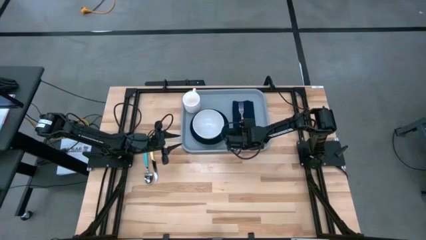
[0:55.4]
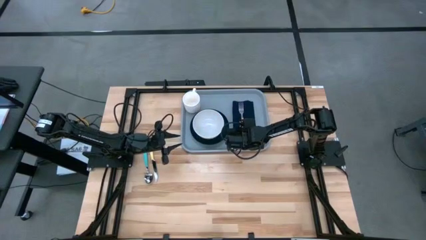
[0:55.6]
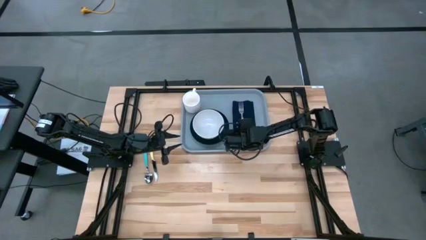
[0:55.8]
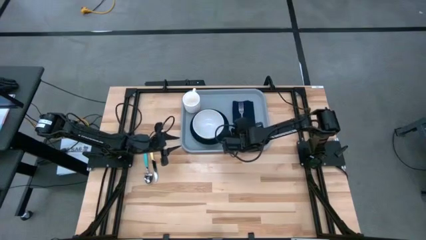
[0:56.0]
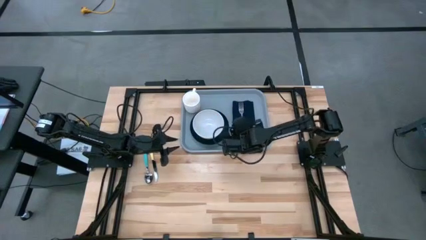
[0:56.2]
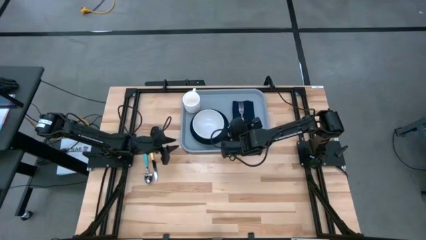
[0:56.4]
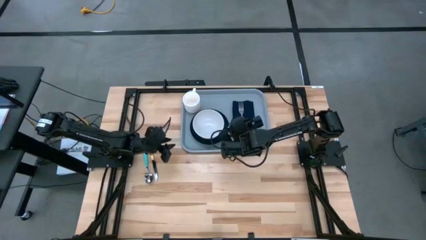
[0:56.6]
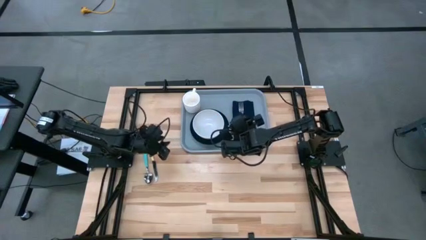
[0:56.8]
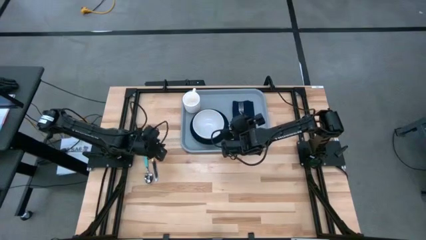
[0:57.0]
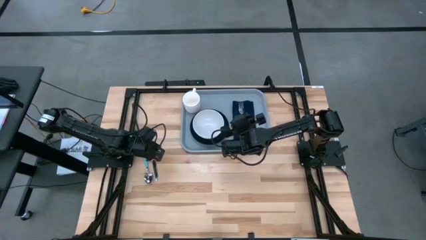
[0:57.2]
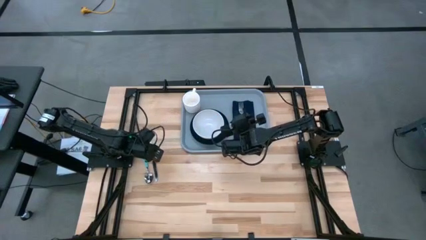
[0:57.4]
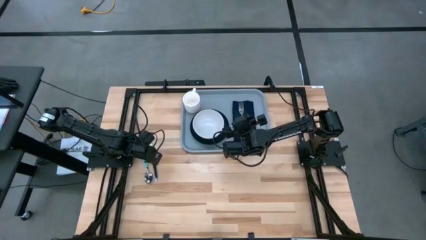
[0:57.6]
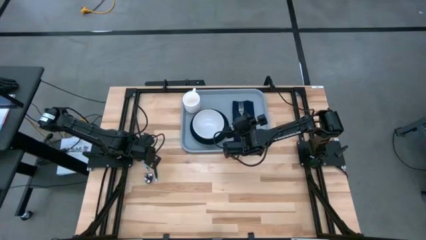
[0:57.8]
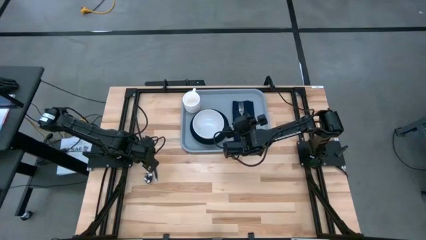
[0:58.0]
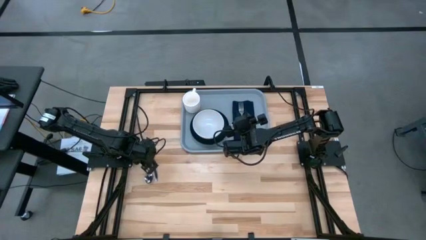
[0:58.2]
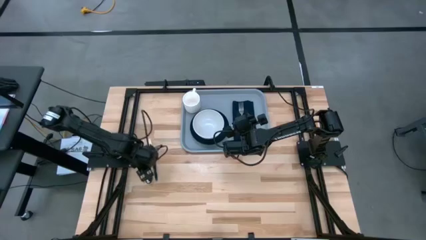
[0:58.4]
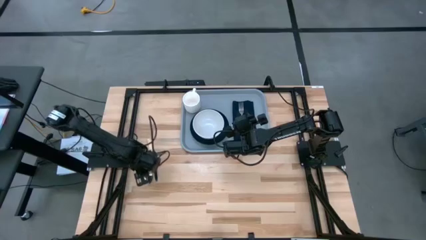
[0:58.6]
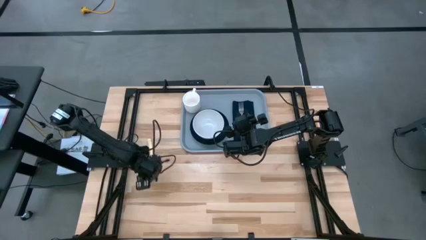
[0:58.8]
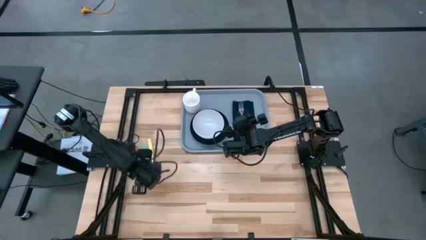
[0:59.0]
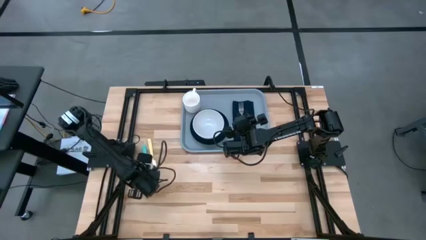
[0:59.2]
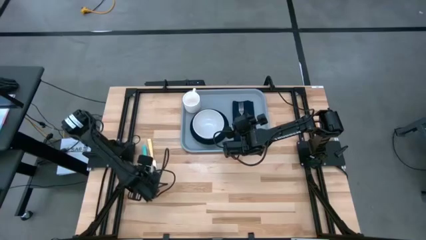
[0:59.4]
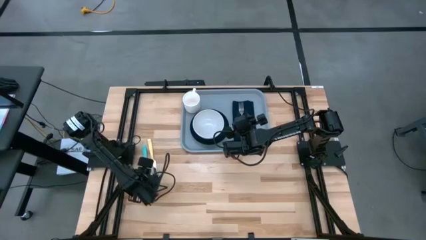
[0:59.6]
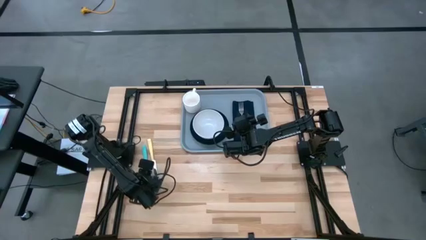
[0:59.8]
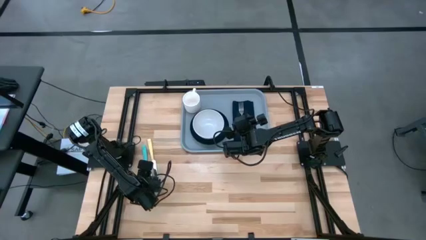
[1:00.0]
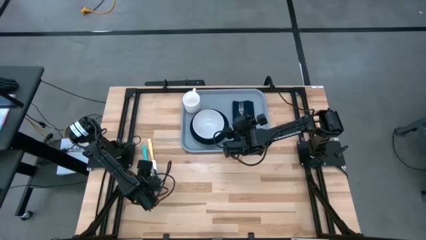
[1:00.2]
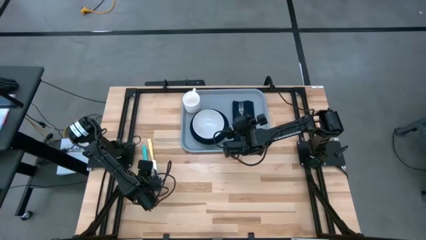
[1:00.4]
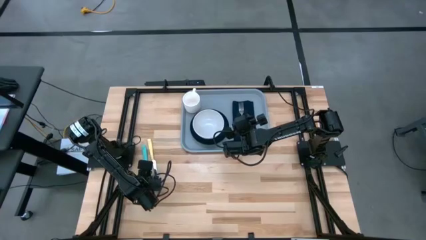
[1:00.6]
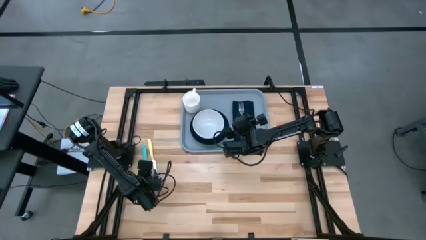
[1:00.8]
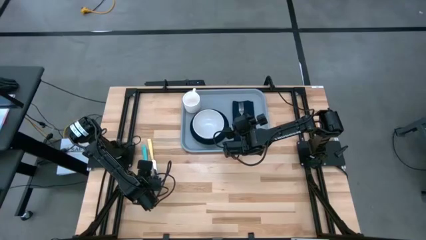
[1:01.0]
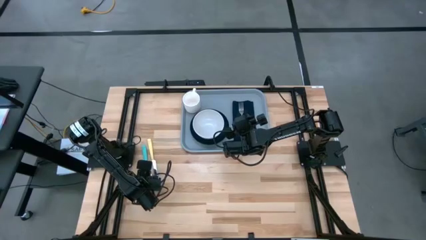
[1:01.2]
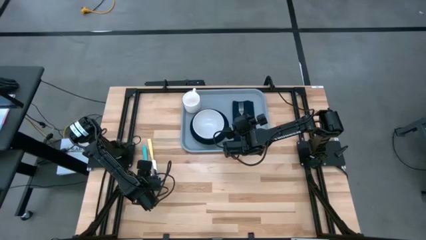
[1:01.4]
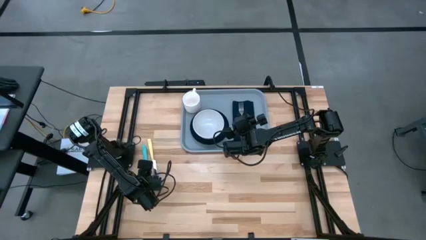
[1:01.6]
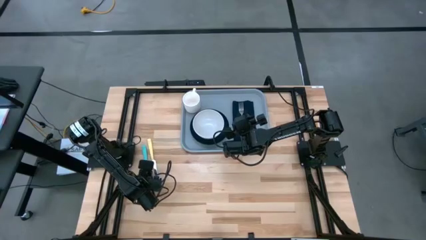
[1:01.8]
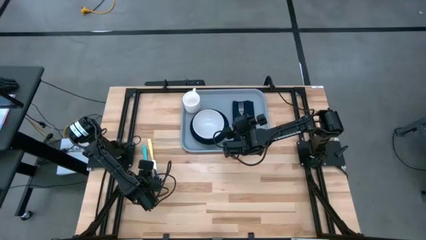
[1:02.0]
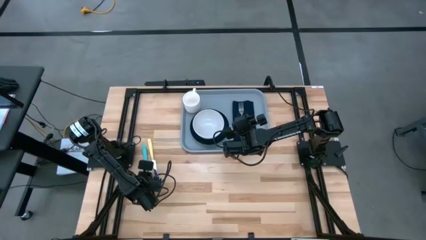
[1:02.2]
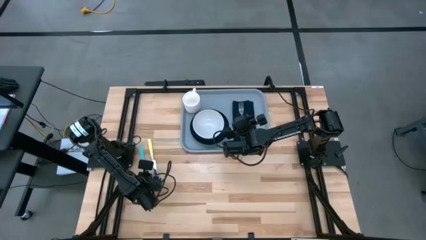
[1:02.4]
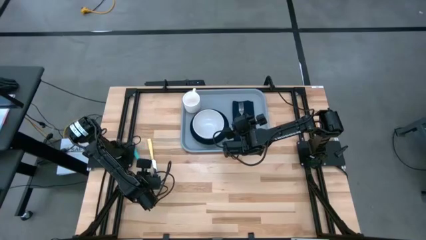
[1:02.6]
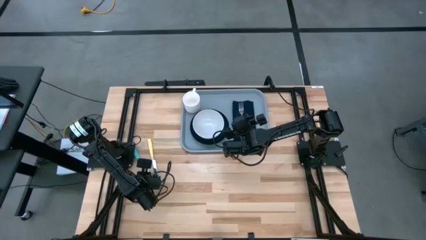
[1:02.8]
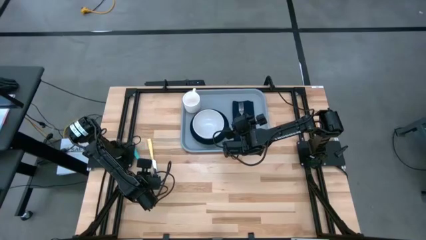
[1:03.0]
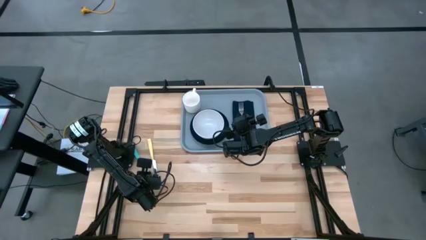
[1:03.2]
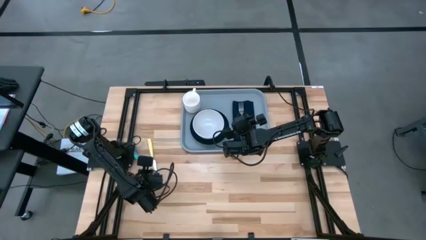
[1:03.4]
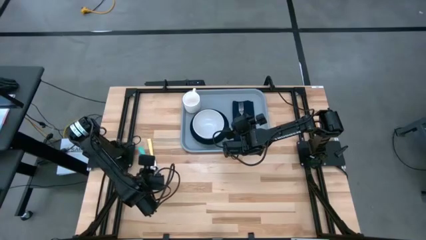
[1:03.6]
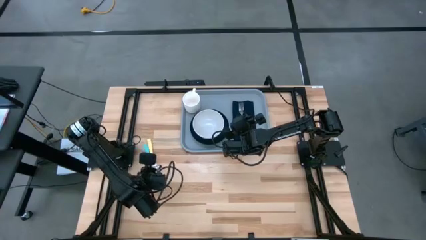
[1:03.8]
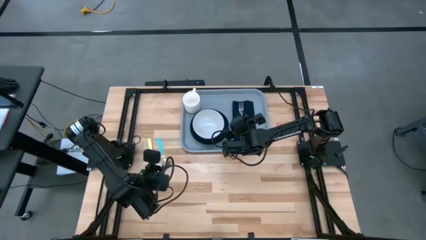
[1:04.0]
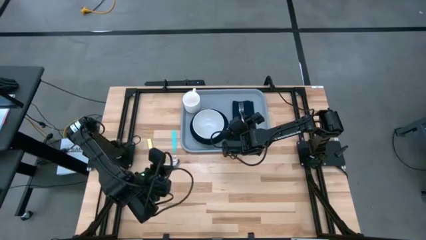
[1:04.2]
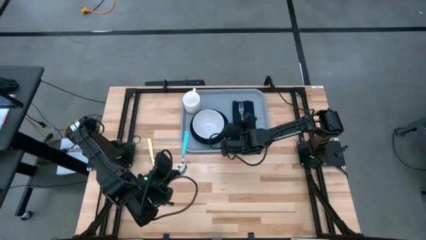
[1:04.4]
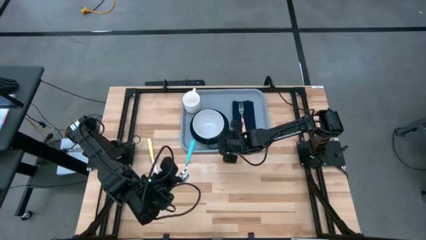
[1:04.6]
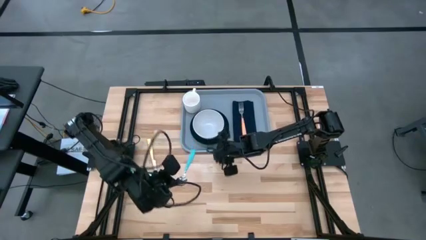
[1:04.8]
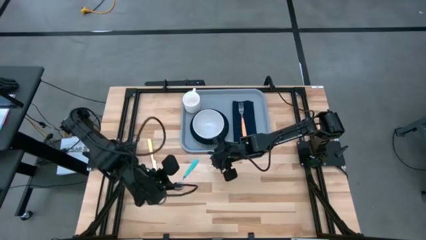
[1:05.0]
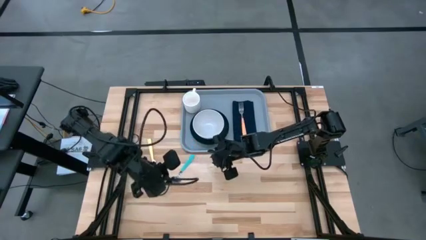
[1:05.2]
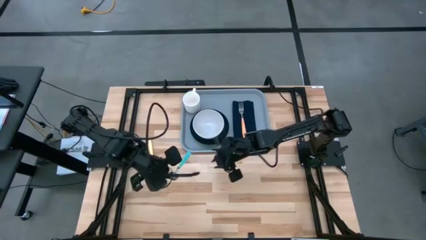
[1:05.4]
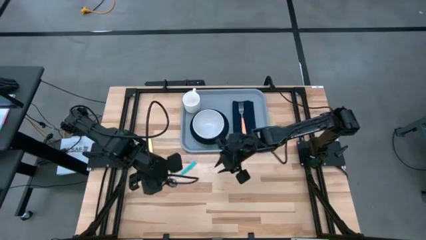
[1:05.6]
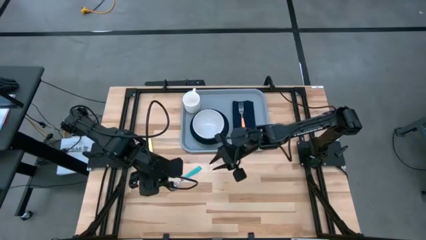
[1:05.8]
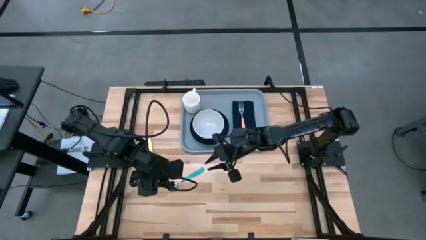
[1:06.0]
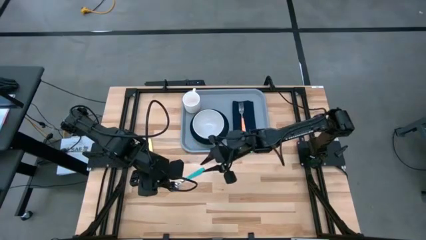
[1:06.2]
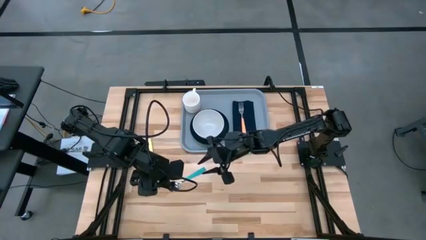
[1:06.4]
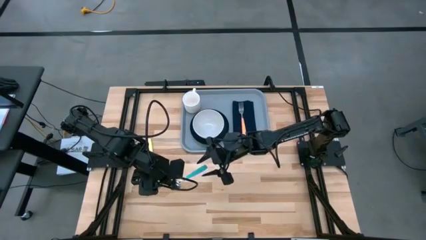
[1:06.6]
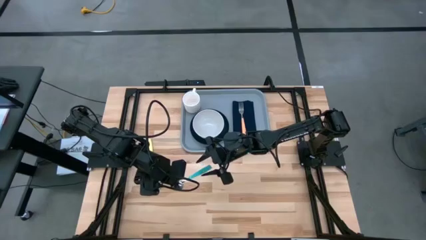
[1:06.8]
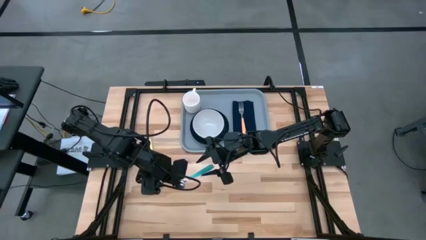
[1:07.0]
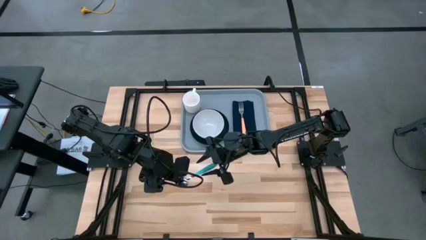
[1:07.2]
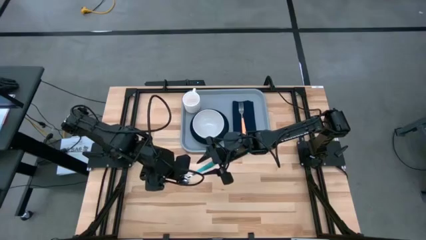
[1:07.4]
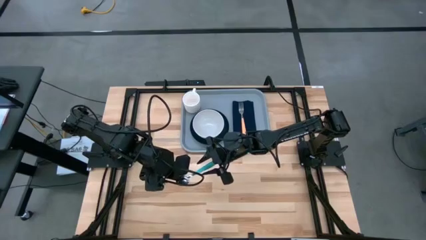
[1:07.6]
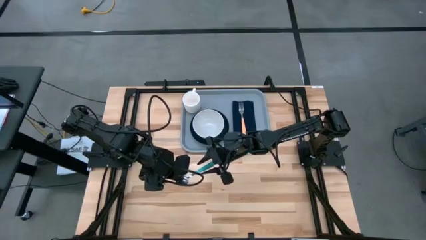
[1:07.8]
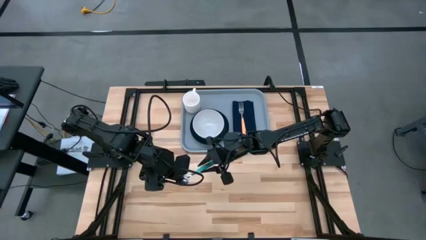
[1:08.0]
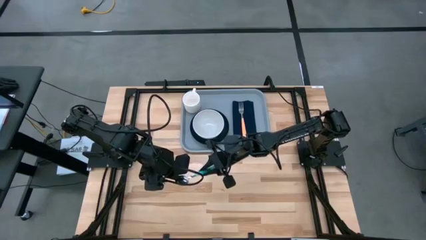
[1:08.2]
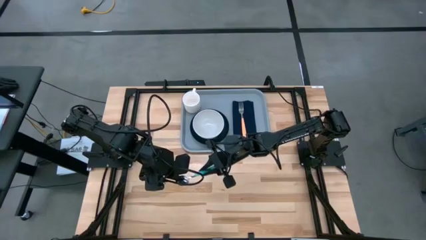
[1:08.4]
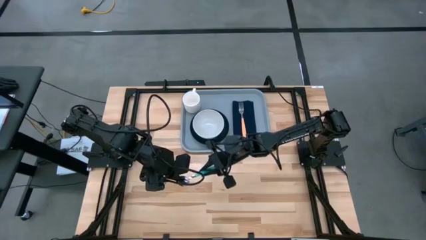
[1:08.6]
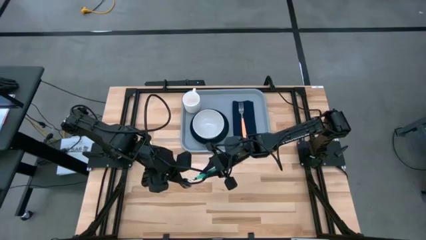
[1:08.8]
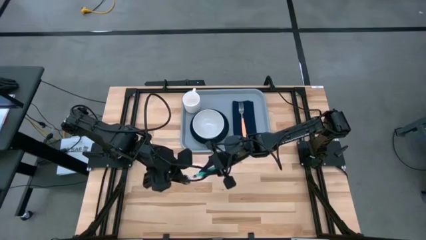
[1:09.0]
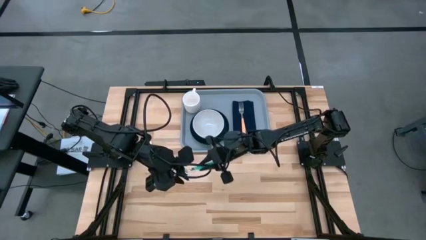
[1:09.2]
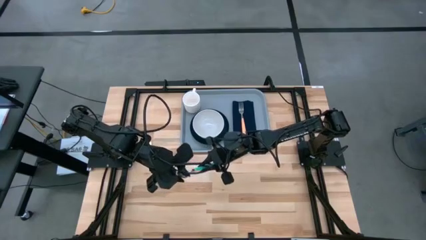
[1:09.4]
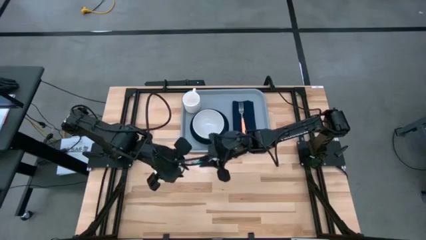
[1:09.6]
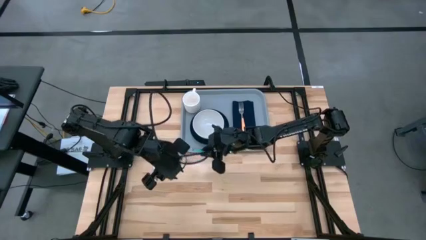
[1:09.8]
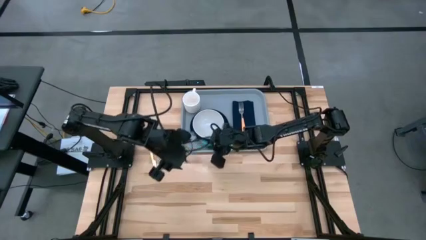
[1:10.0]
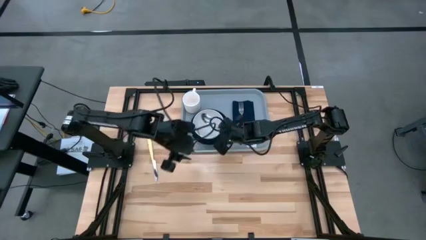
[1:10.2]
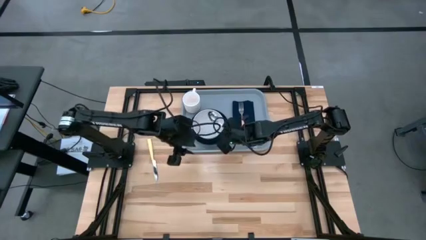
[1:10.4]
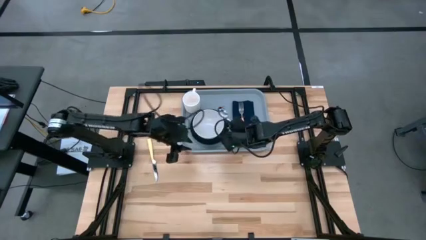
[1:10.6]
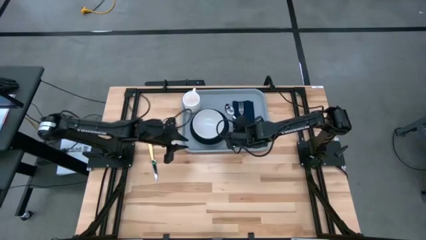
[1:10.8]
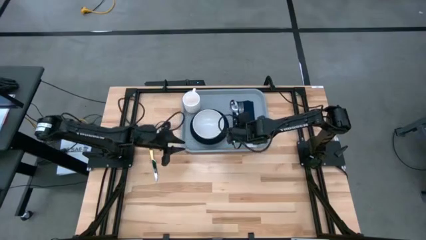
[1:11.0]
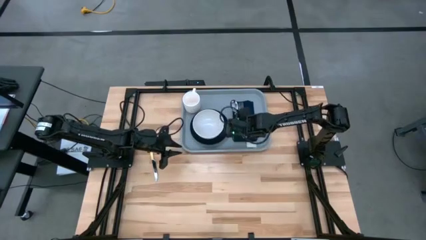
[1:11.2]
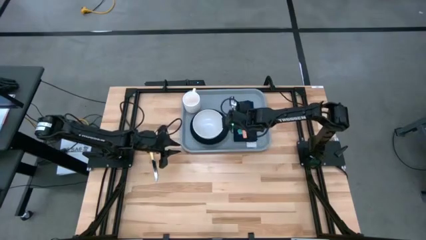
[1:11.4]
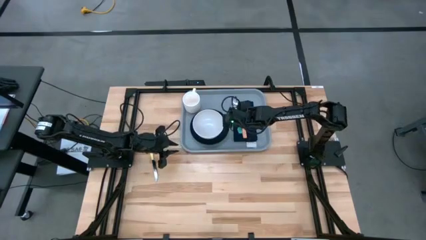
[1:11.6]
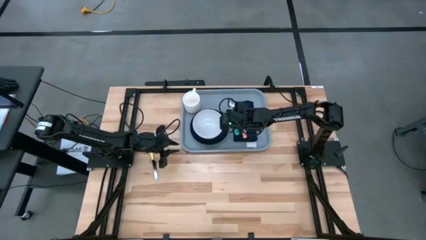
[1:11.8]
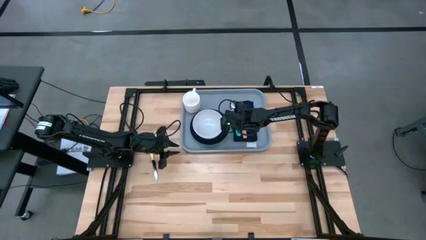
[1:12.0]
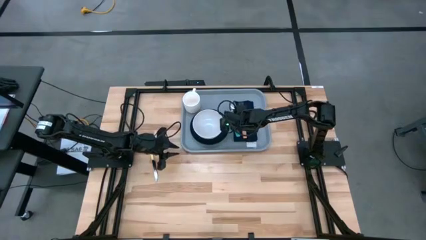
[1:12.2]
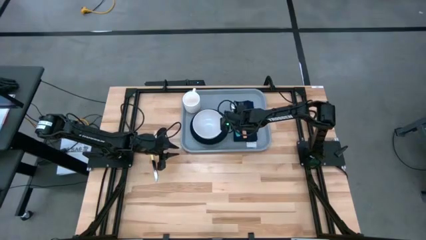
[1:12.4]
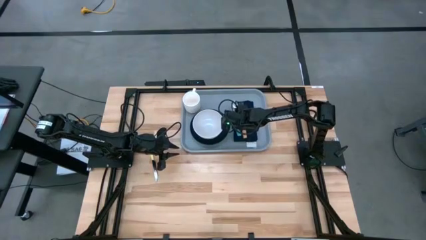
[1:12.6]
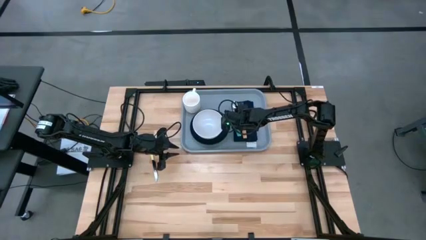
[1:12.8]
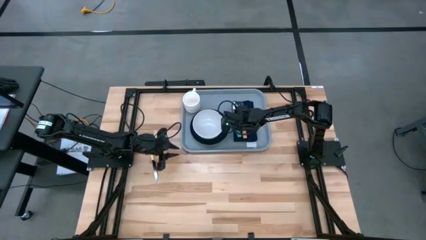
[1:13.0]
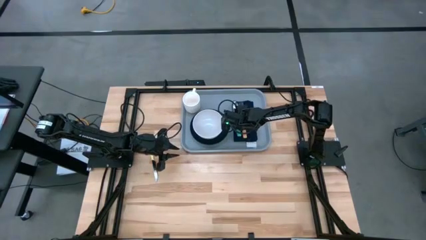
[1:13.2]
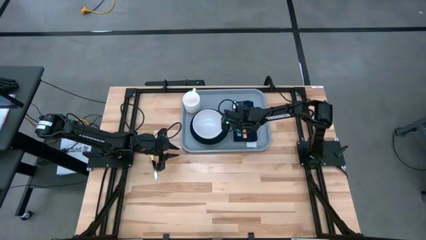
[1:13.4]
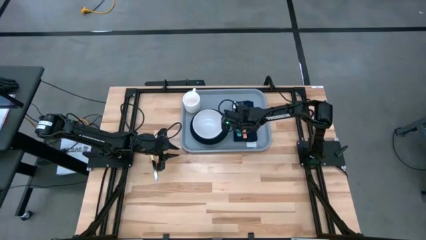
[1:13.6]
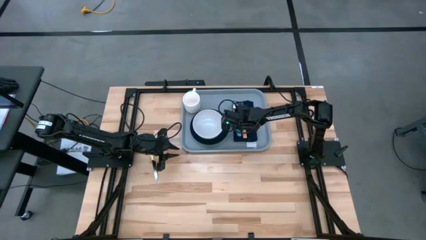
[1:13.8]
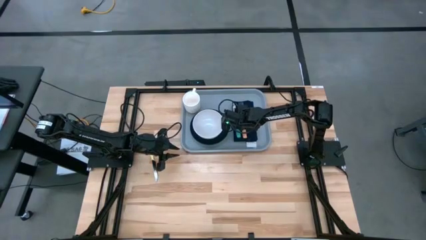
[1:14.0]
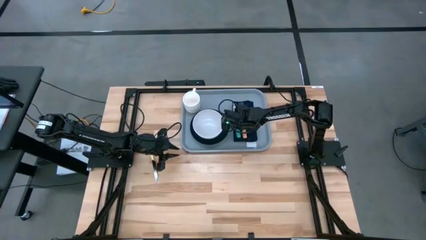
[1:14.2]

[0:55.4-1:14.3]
Task: Set up tray
Put the blue spoon to the left of the orange fork on the gray table tray
